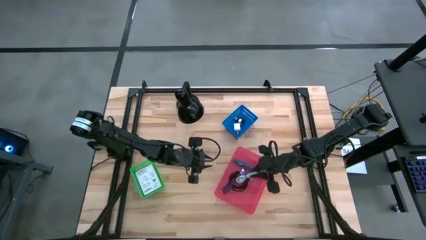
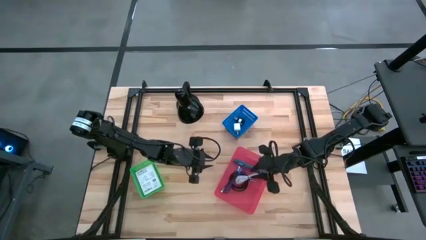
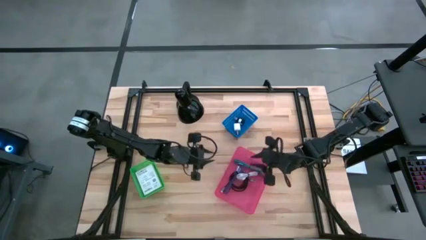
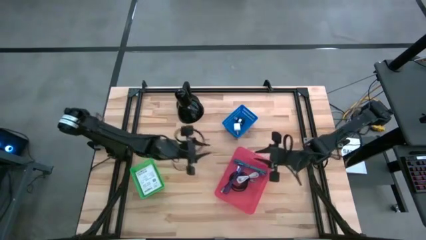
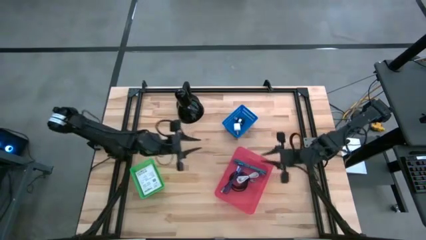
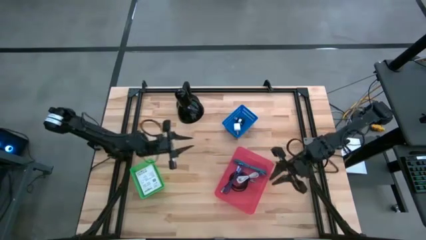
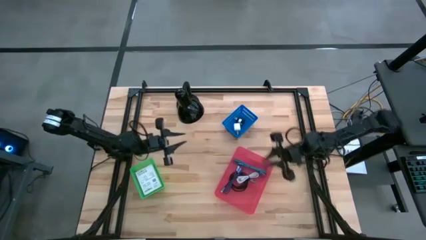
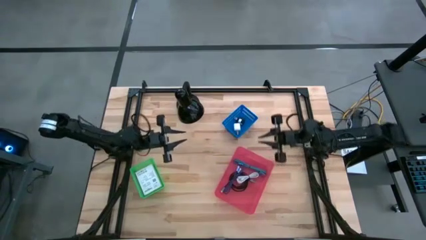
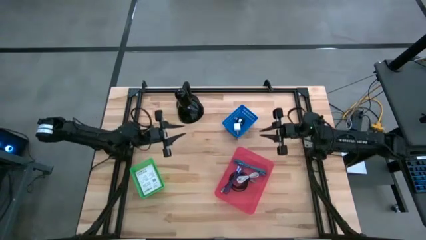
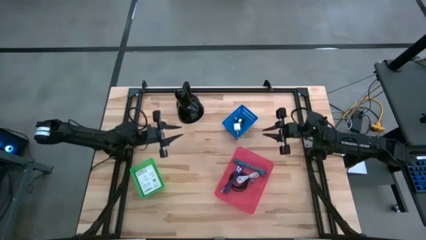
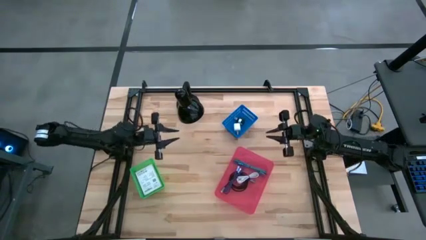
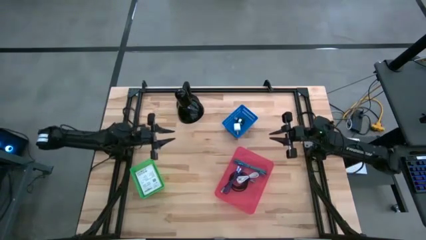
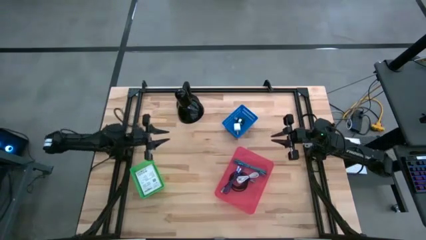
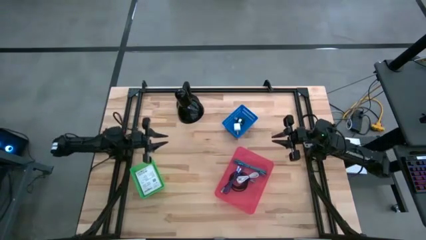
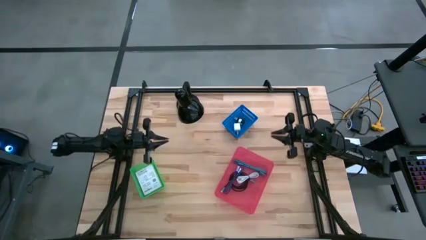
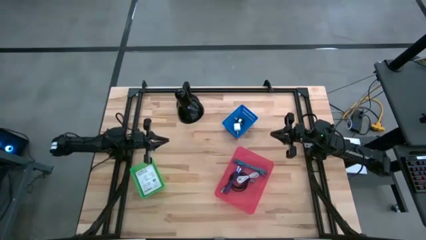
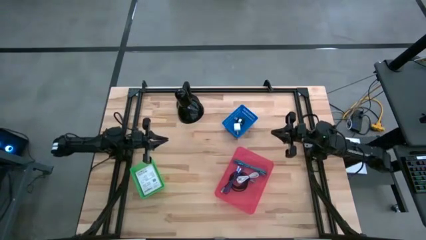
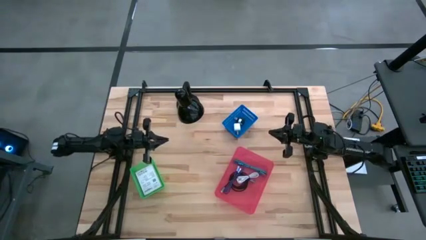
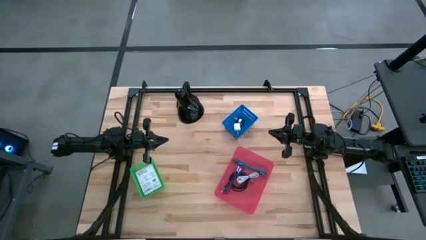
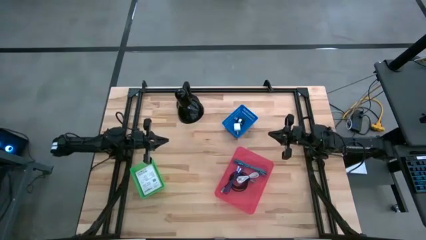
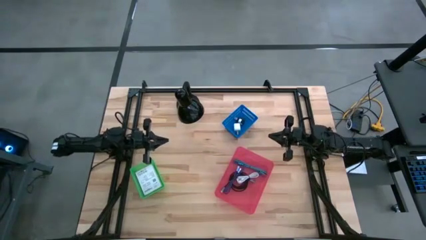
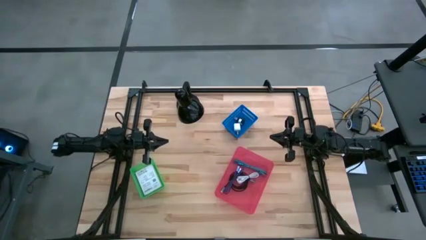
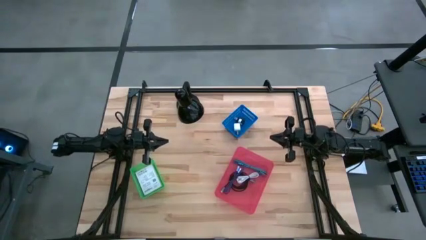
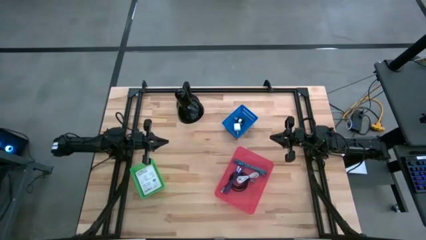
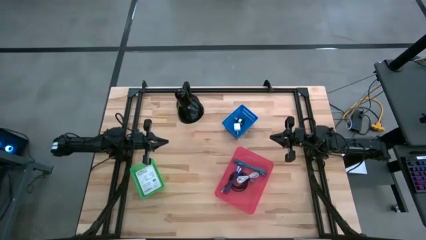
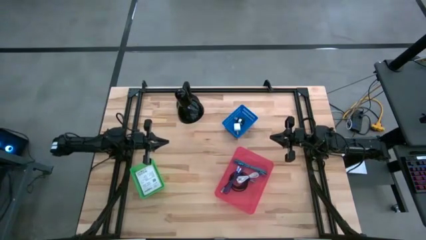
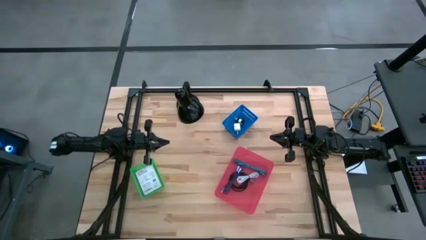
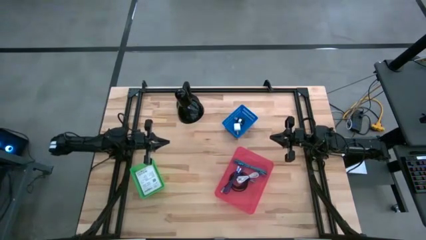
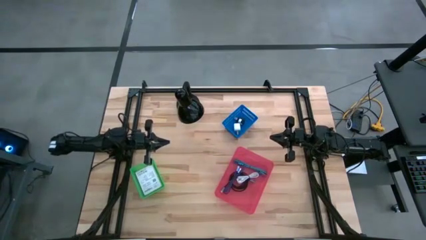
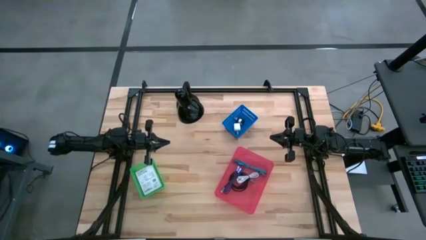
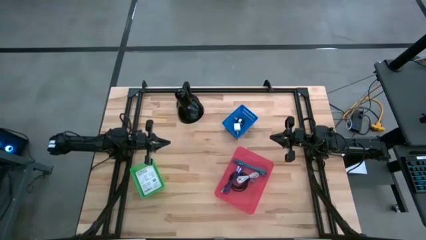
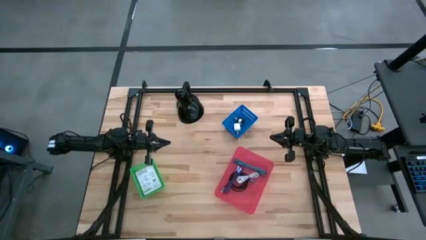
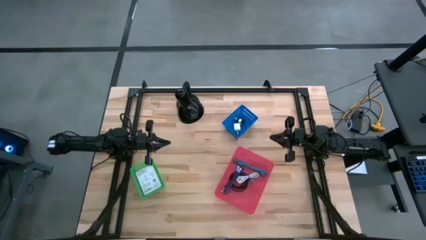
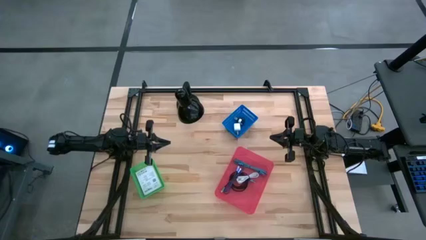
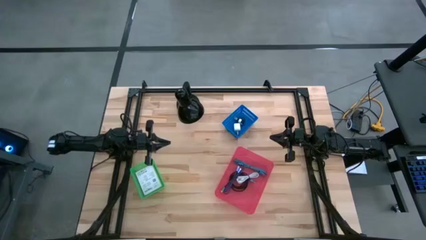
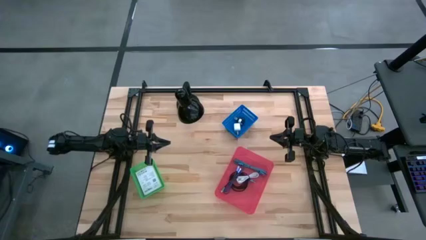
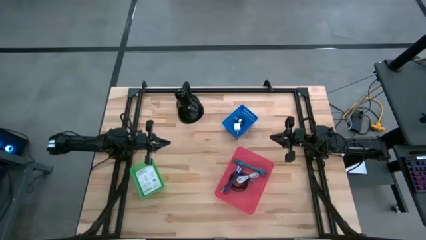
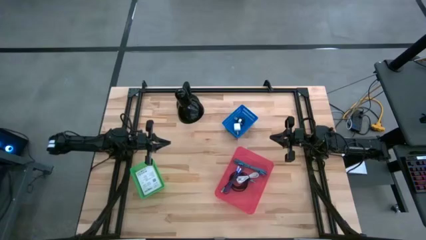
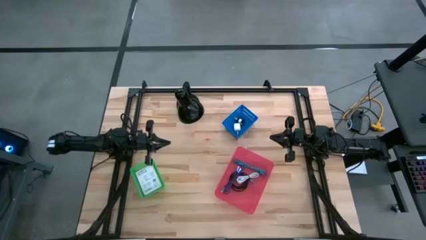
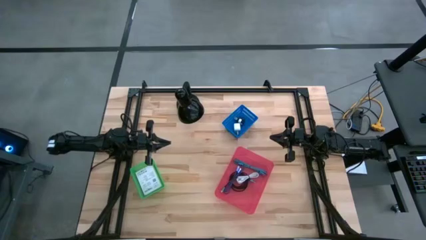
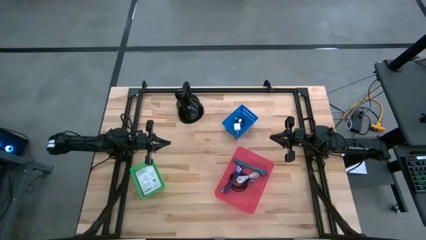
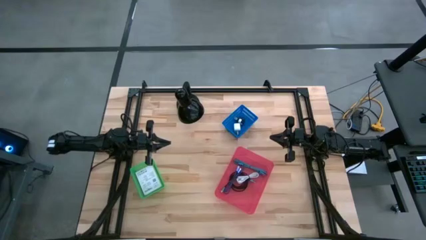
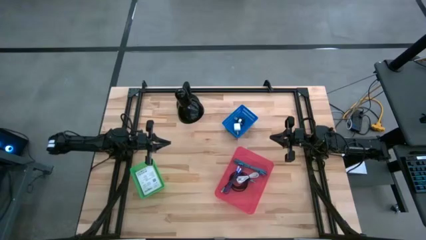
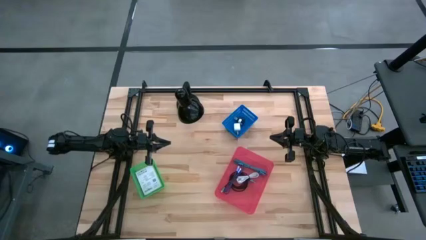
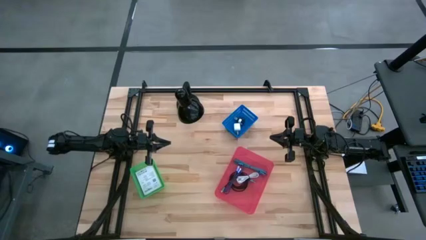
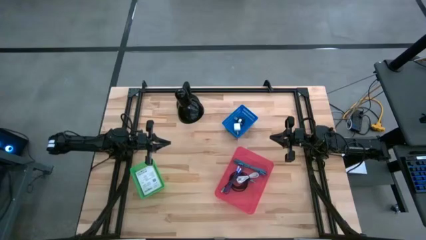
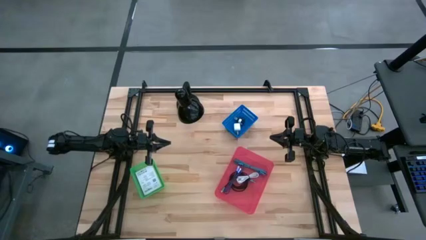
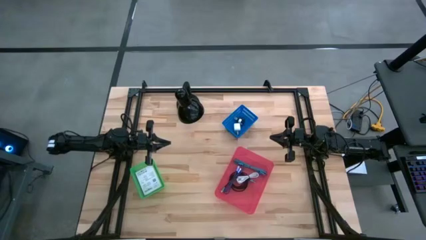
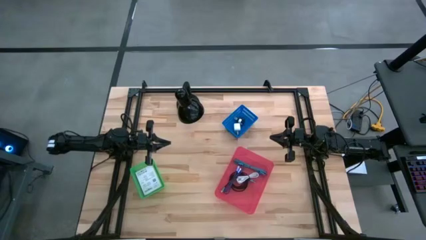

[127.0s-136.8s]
Task: Pick and place items into bin
Return to Home Position
